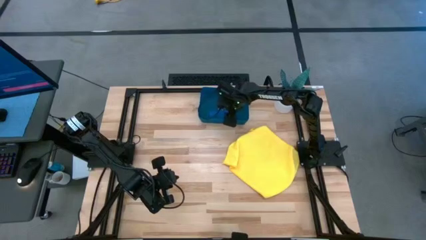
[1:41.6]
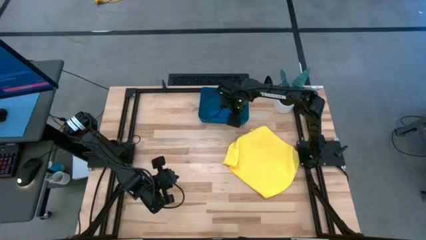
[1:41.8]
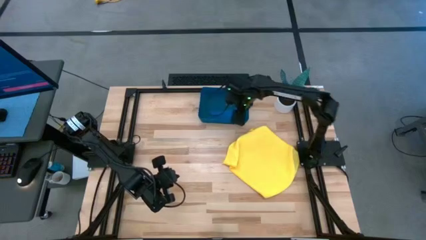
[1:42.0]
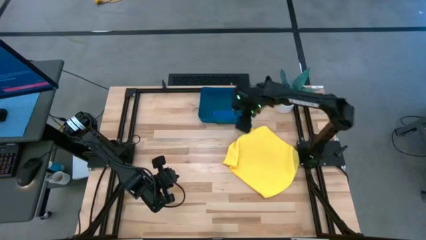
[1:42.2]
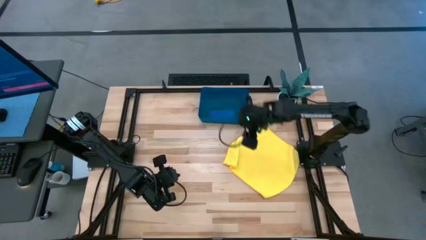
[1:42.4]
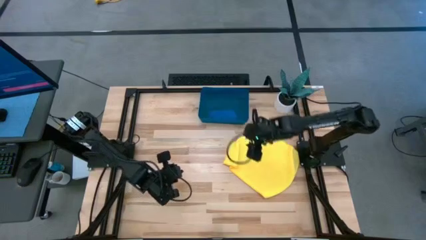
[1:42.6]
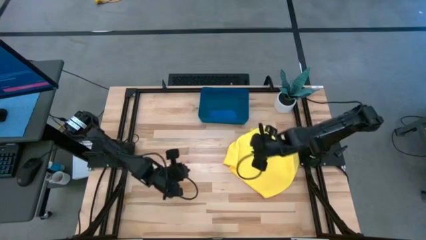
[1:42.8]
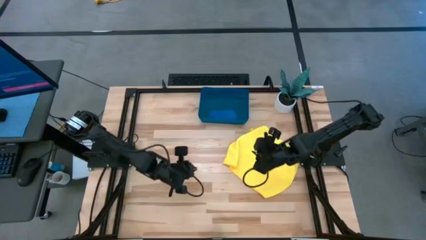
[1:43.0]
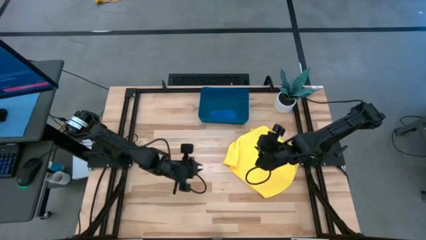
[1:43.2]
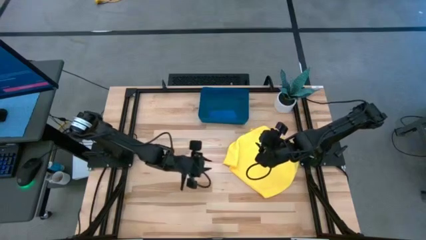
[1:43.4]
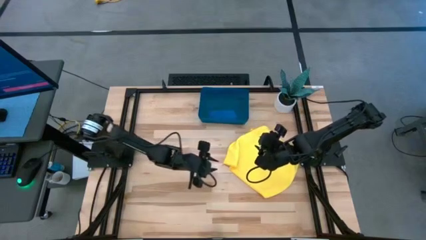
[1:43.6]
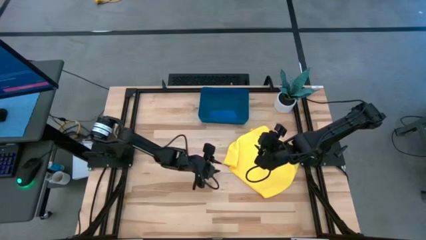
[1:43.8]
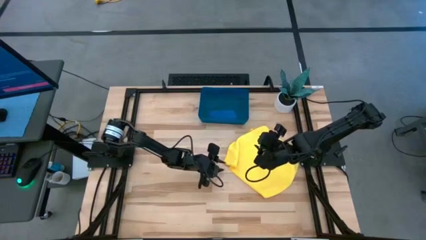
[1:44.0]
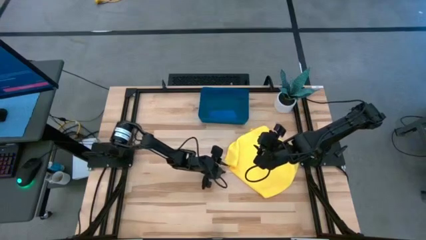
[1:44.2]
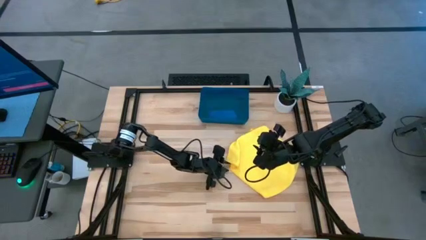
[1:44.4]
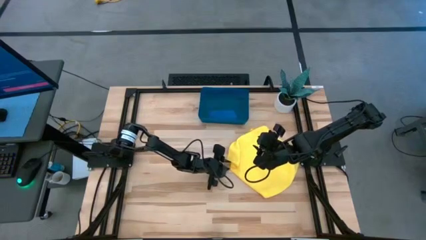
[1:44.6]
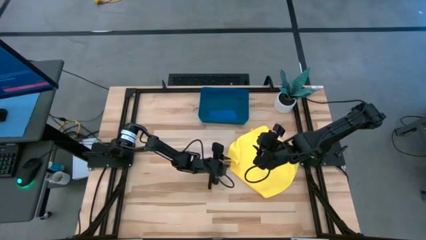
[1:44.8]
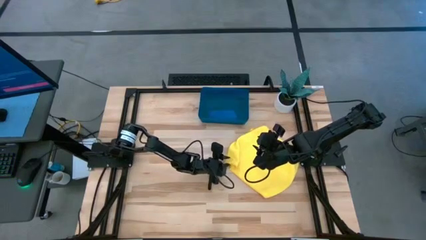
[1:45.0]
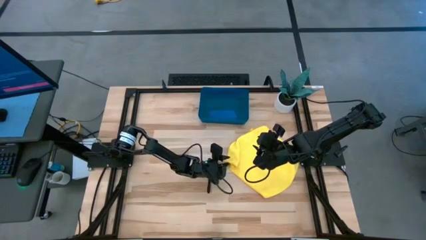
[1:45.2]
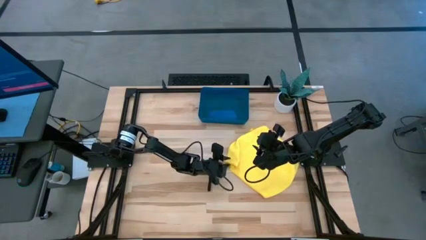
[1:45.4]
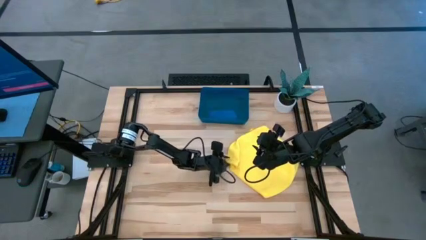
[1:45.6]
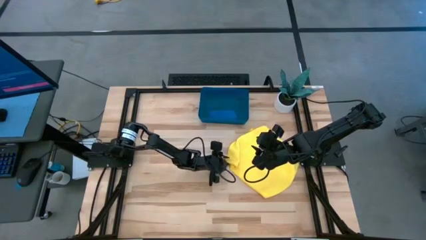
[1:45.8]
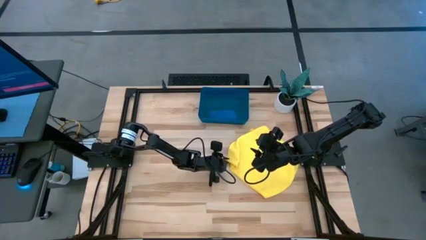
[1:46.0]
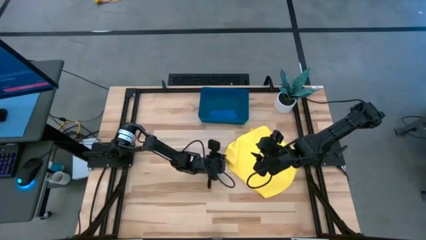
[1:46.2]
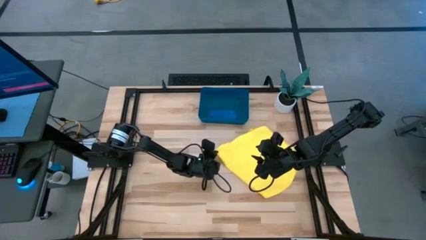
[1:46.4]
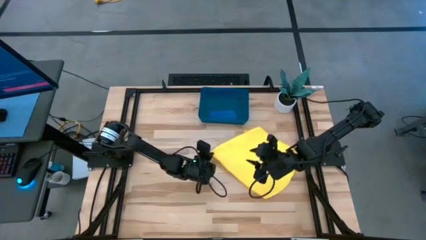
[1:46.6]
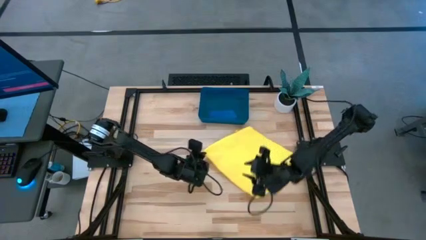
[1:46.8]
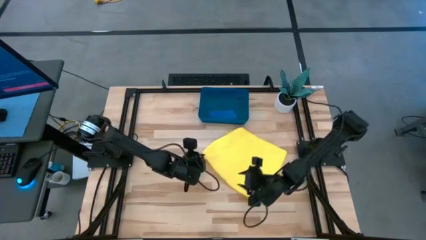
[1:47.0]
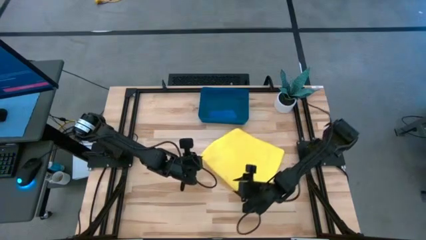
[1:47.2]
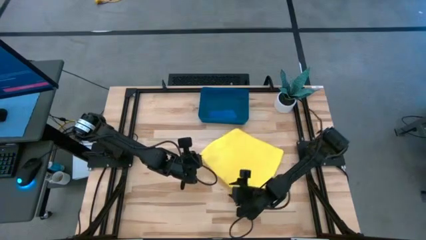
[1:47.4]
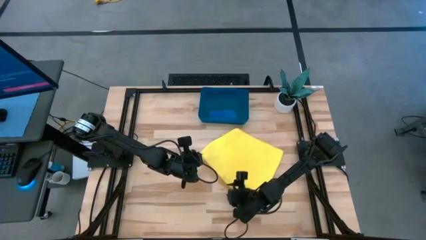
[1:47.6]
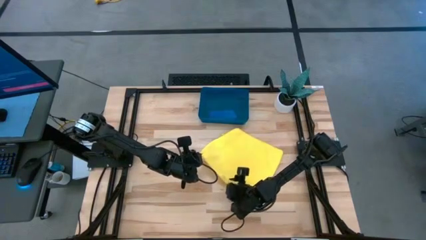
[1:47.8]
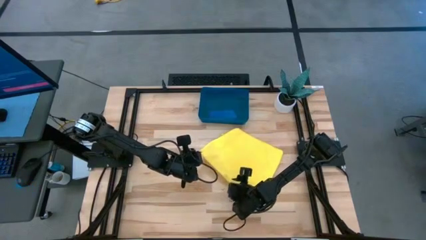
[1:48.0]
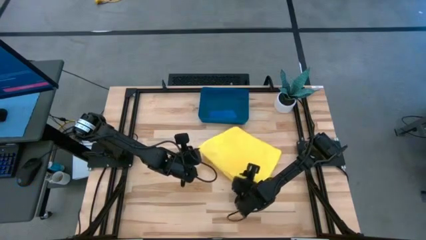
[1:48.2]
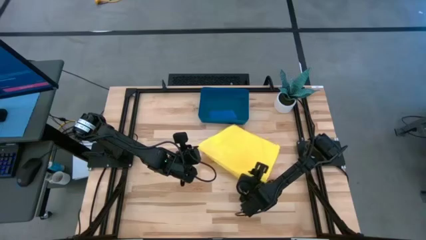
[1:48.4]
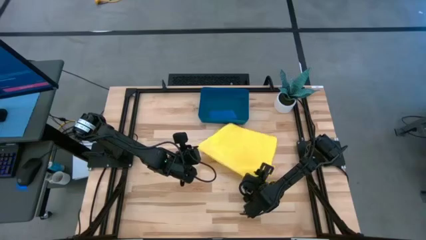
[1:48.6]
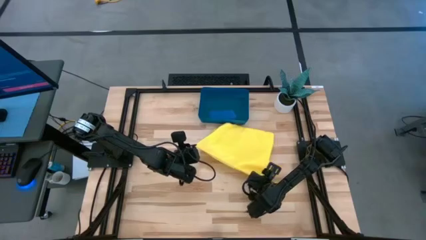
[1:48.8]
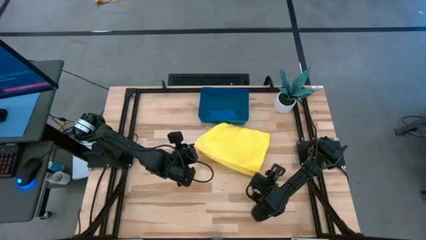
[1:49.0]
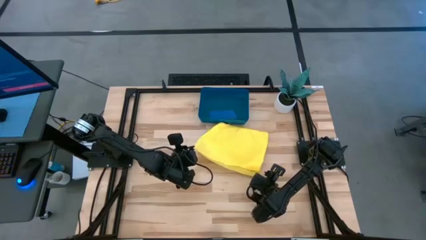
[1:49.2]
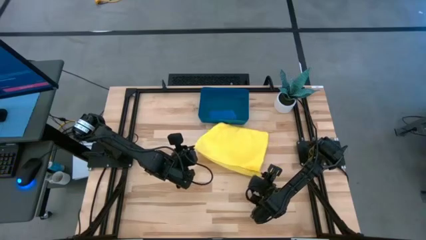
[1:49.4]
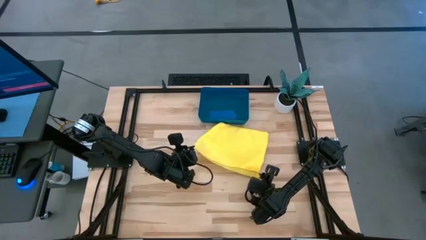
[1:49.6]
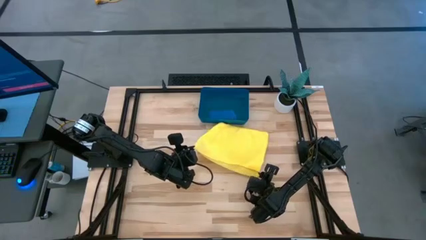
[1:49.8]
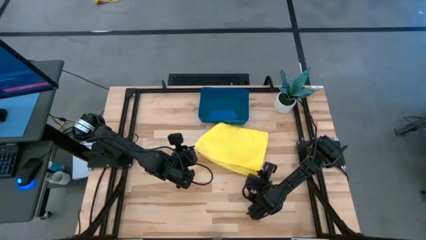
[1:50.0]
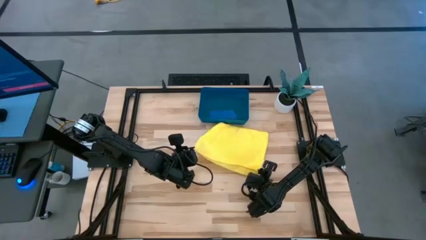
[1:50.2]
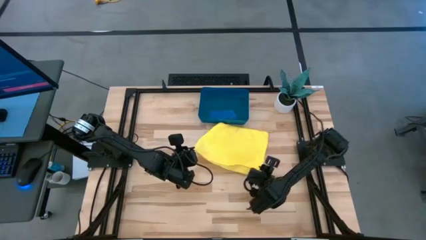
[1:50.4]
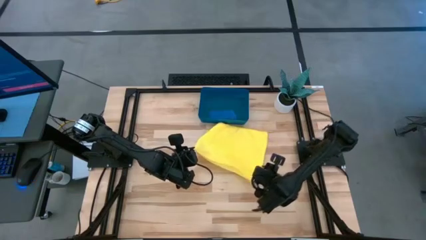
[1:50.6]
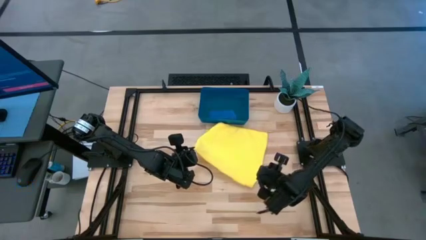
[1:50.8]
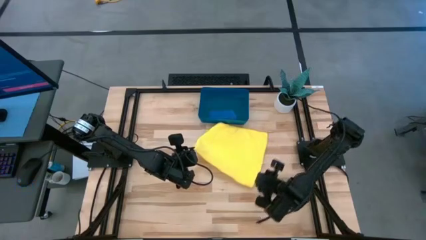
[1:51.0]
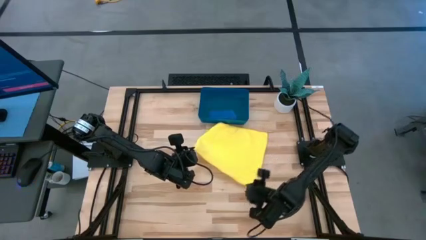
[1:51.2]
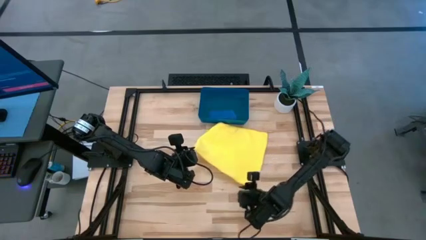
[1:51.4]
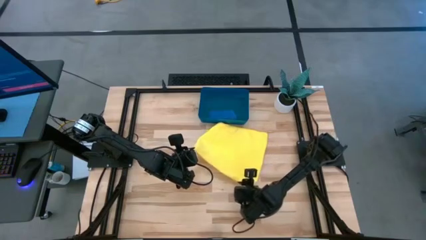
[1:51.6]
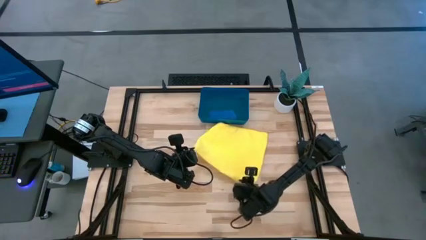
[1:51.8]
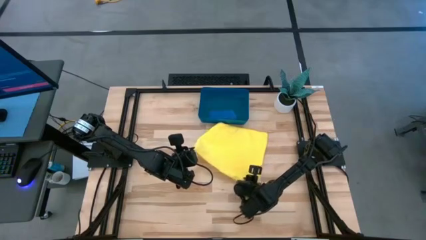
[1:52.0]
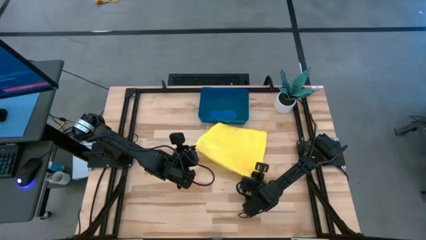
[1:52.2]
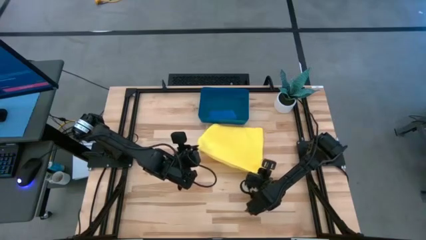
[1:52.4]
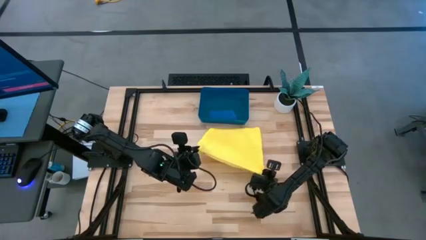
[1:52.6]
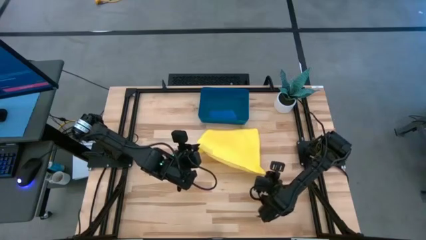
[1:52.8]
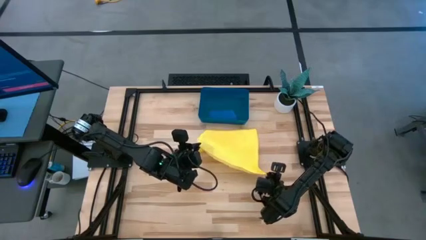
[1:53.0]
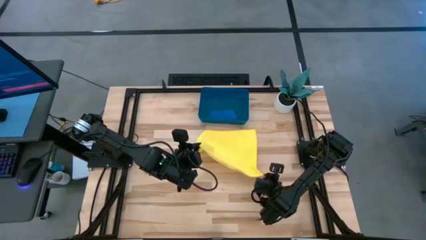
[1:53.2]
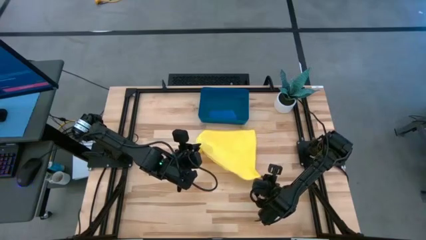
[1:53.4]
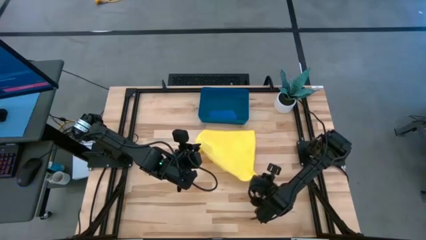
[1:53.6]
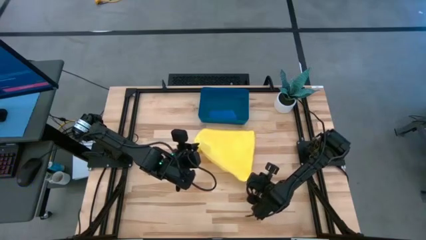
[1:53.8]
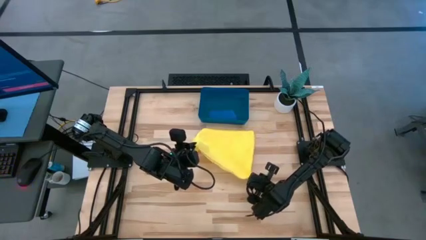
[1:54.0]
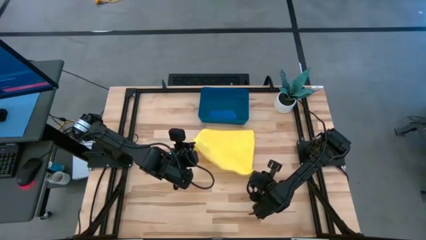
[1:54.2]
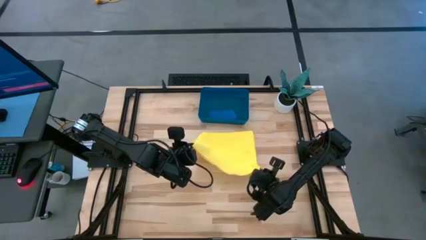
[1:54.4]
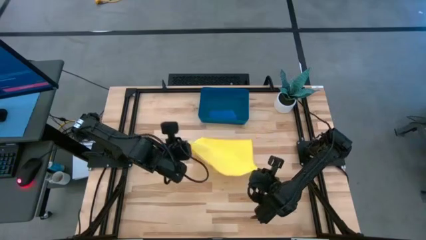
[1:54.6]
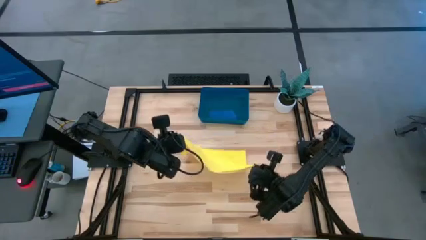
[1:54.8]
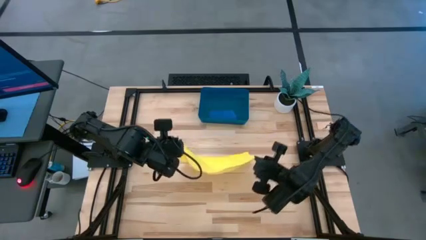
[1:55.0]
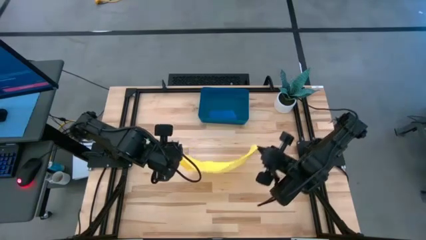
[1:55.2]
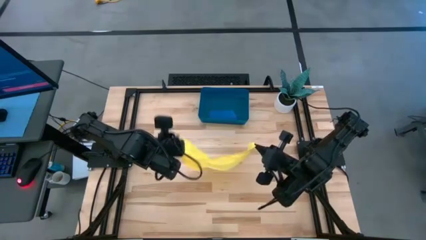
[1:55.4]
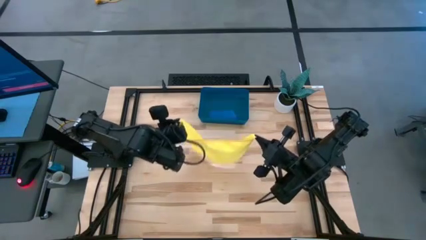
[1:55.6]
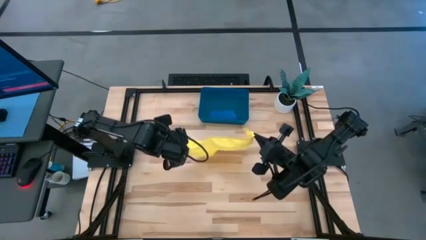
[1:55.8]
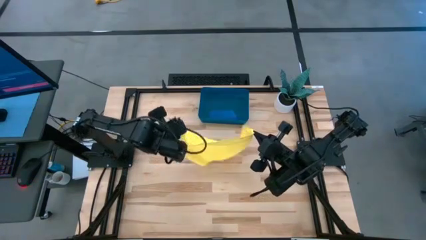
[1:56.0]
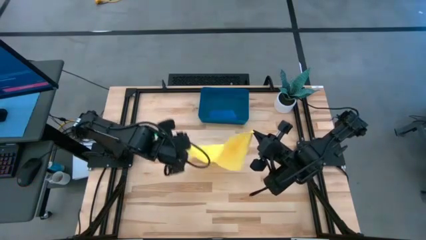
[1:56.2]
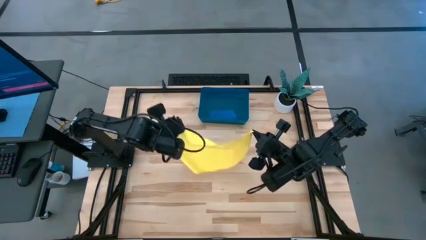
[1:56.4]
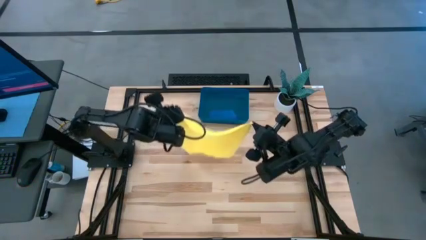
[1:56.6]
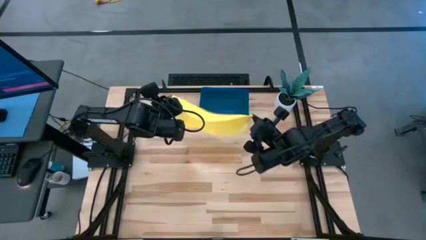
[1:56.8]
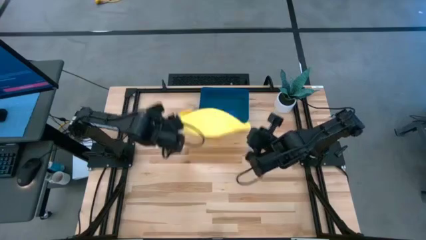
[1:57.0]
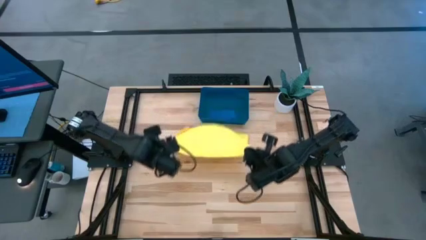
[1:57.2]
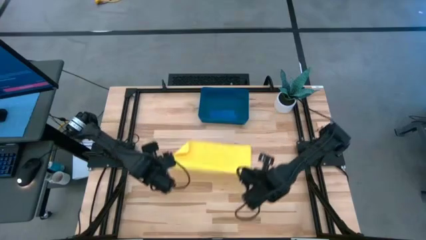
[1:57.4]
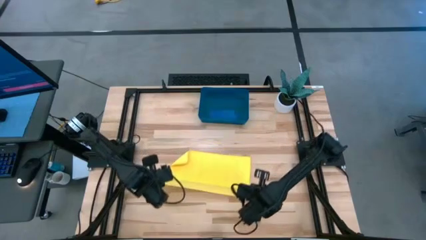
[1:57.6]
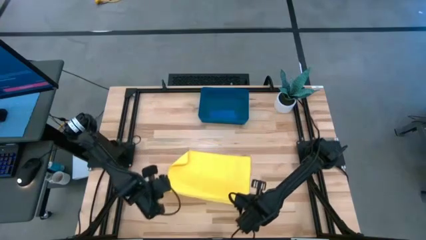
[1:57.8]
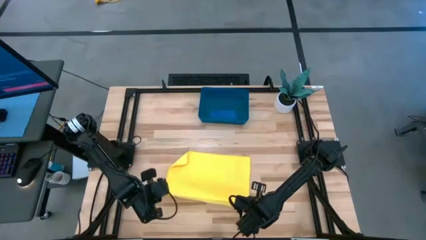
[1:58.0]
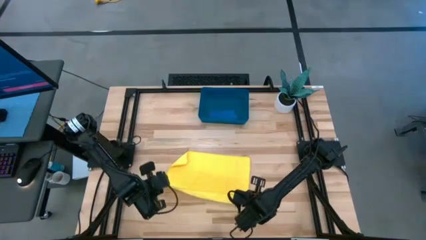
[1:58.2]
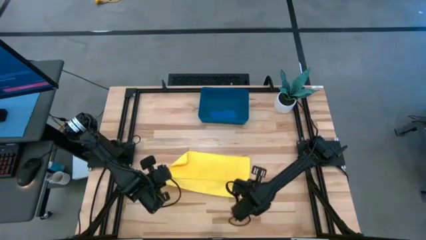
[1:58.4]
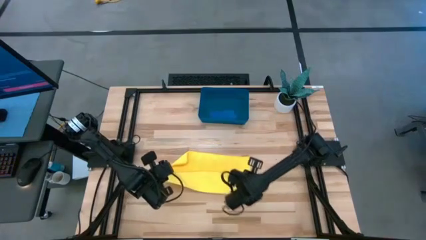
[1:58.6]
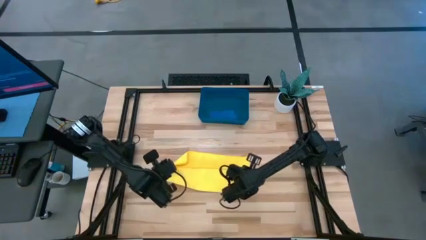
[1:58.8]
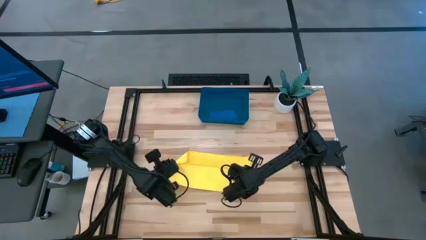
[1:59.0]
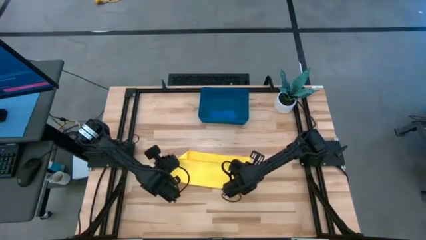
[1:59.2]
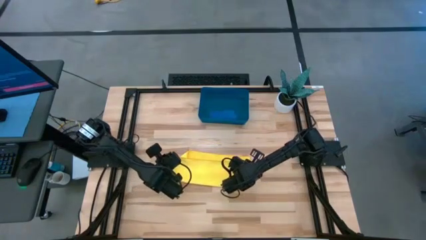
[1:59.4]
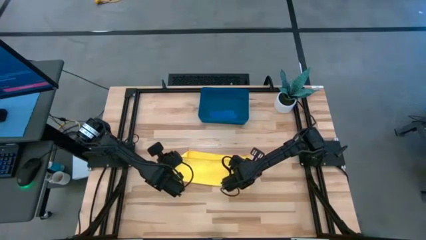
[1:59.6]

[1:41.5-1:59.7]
Task: Roll microfiber towels into tight, uniform cylinder then place into a basket
Roll the yellow microfiber cloth
